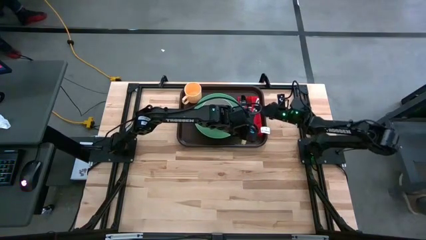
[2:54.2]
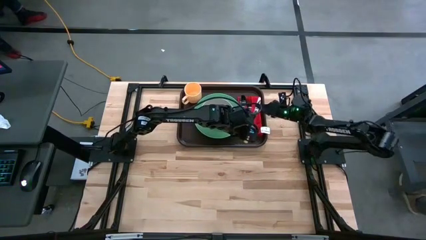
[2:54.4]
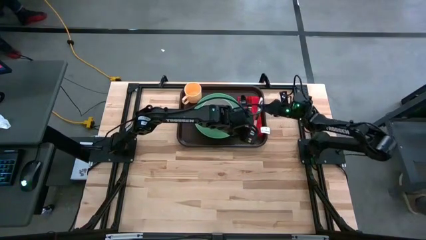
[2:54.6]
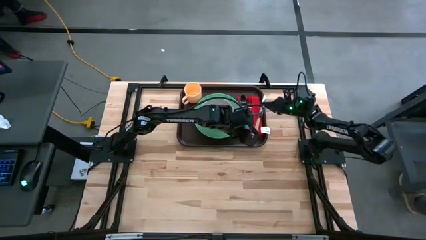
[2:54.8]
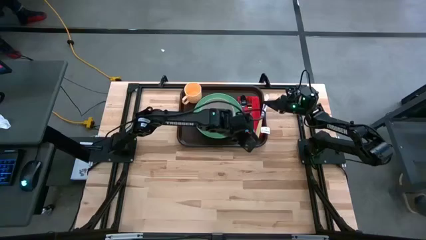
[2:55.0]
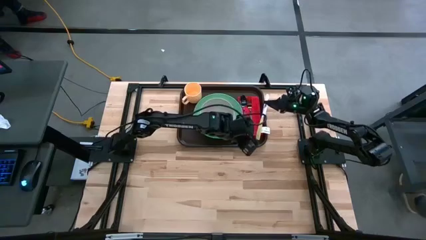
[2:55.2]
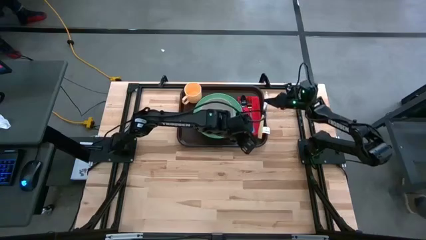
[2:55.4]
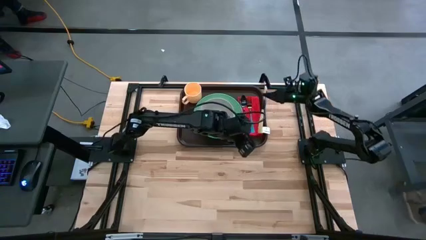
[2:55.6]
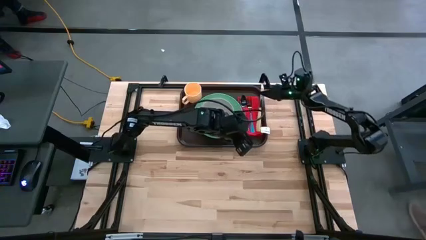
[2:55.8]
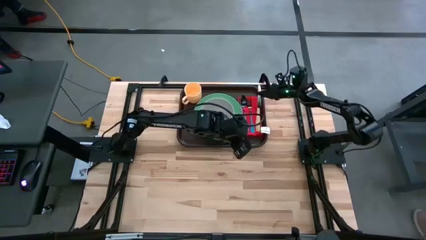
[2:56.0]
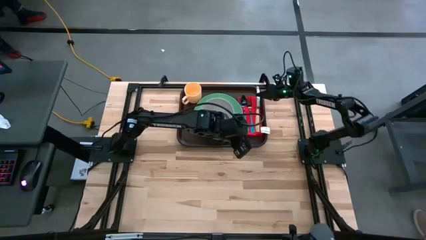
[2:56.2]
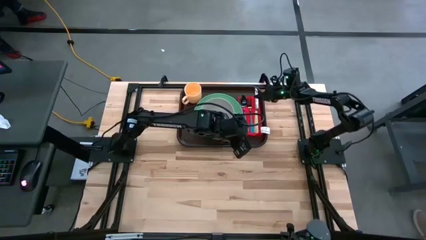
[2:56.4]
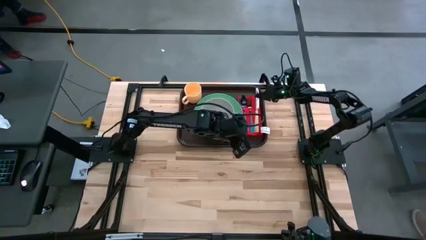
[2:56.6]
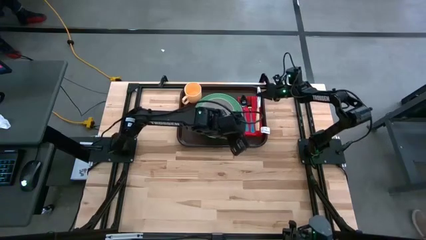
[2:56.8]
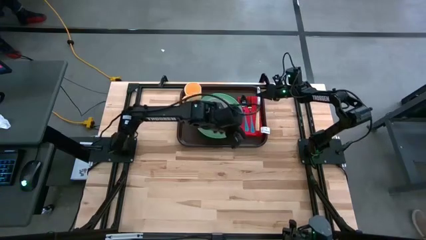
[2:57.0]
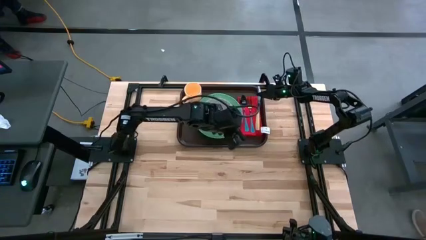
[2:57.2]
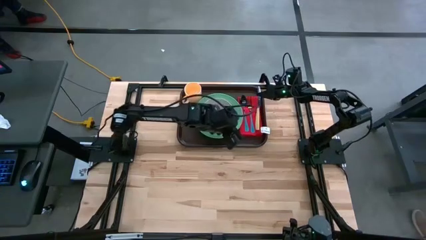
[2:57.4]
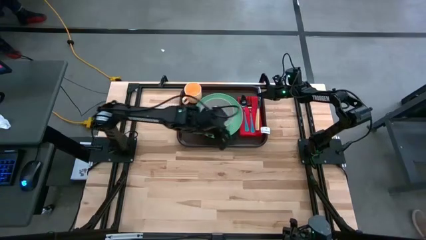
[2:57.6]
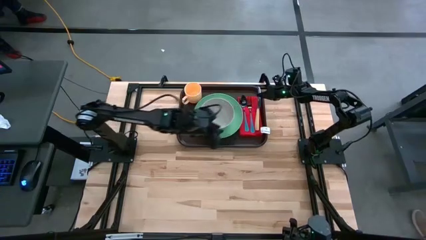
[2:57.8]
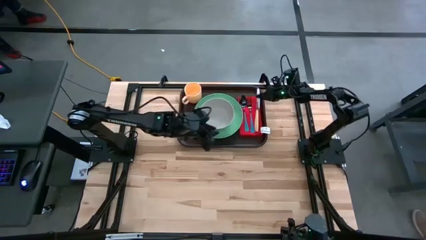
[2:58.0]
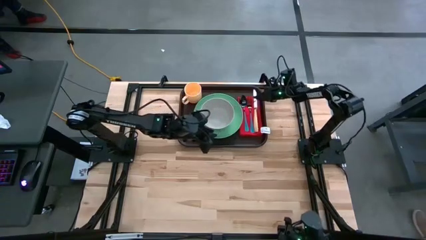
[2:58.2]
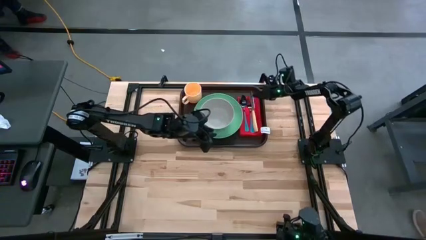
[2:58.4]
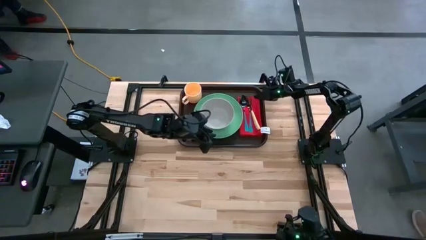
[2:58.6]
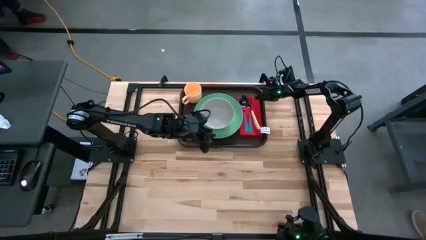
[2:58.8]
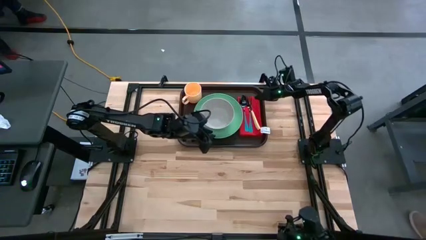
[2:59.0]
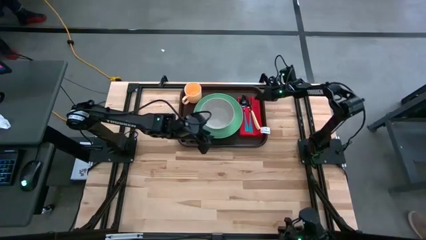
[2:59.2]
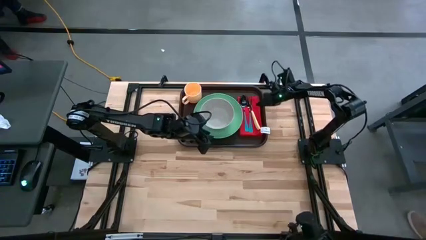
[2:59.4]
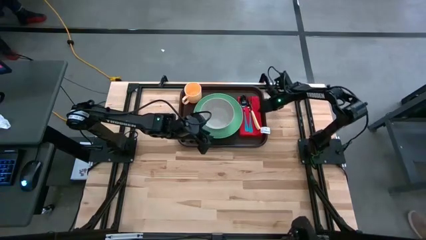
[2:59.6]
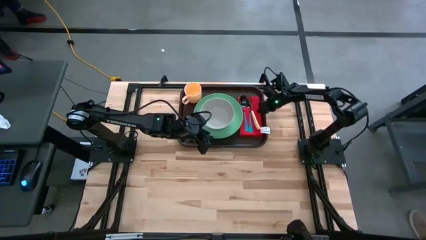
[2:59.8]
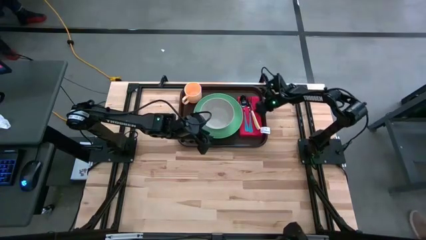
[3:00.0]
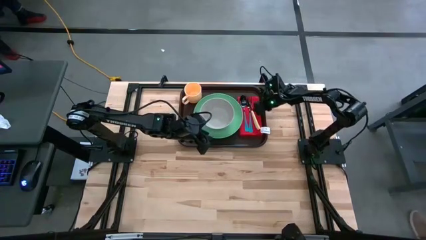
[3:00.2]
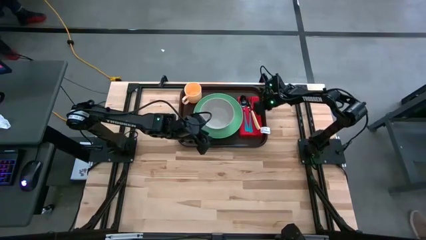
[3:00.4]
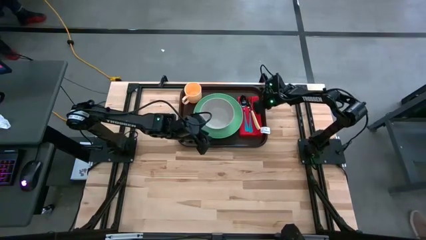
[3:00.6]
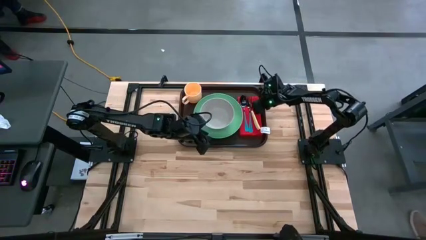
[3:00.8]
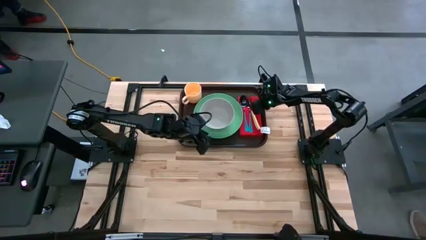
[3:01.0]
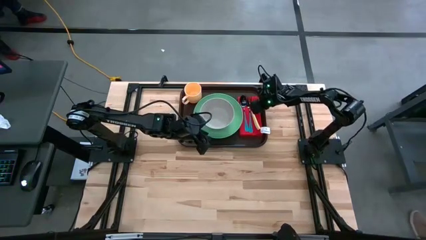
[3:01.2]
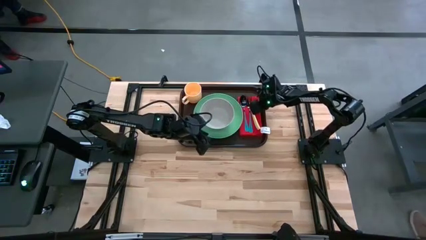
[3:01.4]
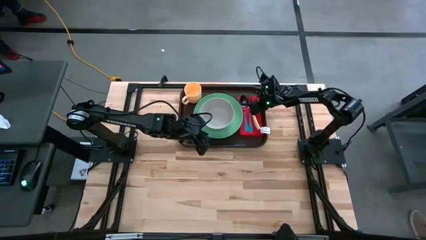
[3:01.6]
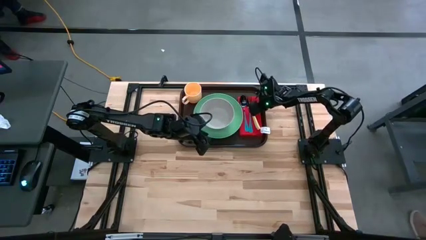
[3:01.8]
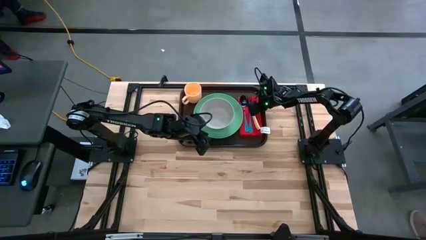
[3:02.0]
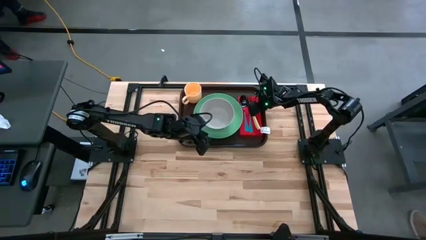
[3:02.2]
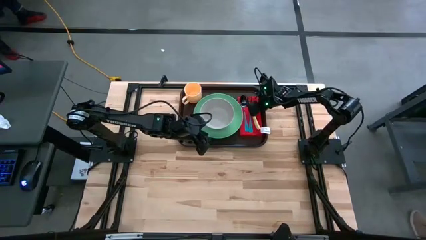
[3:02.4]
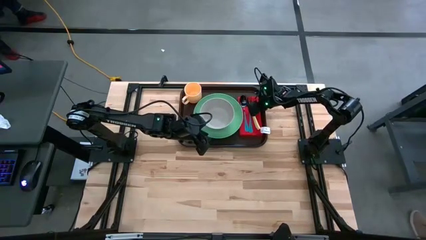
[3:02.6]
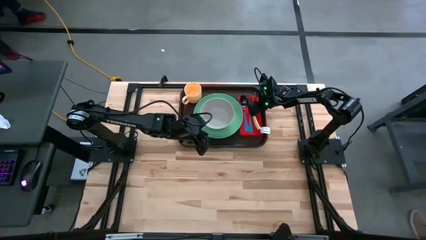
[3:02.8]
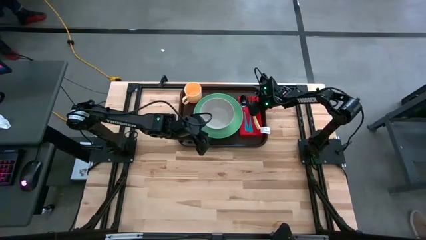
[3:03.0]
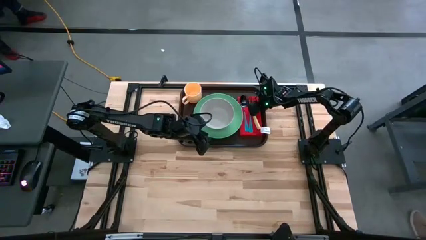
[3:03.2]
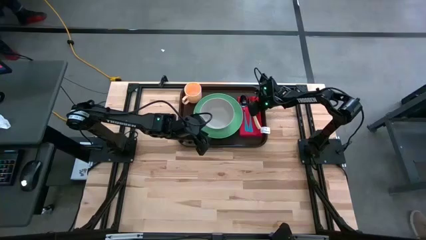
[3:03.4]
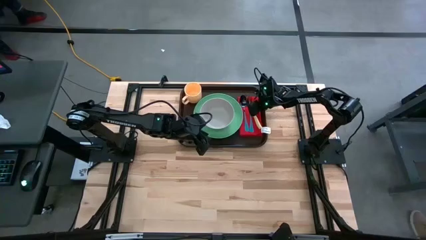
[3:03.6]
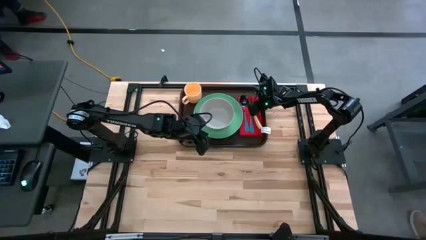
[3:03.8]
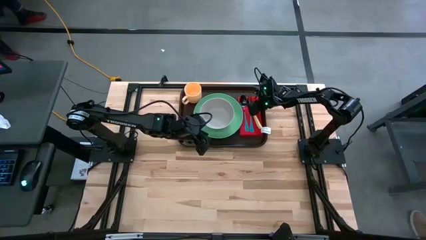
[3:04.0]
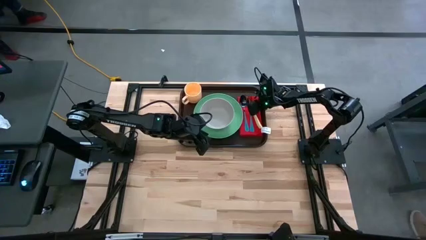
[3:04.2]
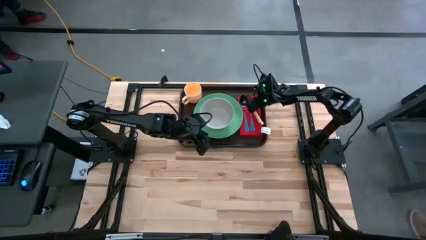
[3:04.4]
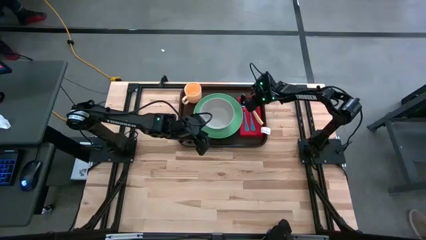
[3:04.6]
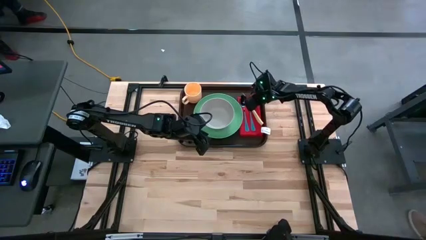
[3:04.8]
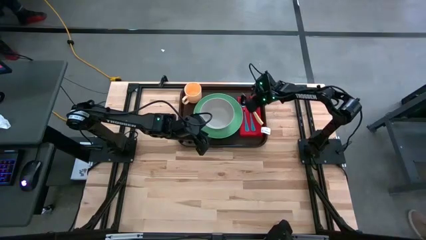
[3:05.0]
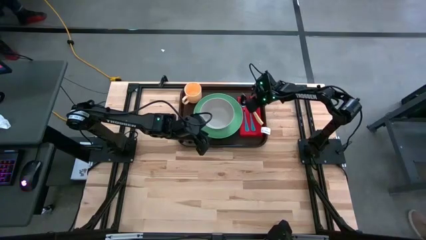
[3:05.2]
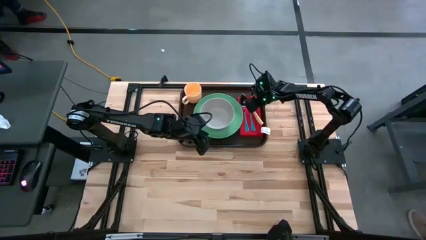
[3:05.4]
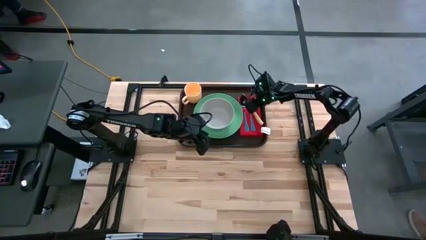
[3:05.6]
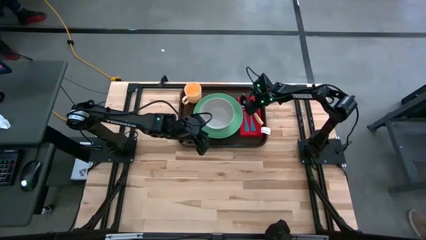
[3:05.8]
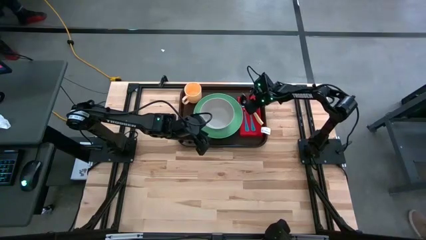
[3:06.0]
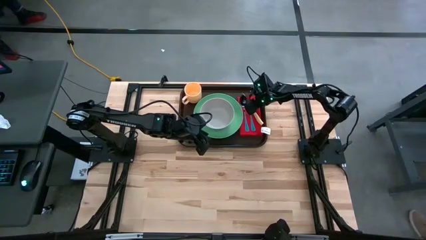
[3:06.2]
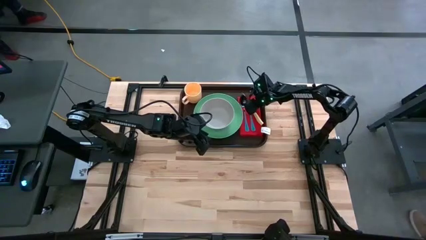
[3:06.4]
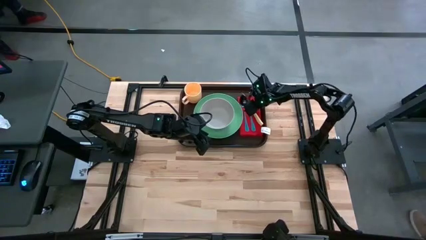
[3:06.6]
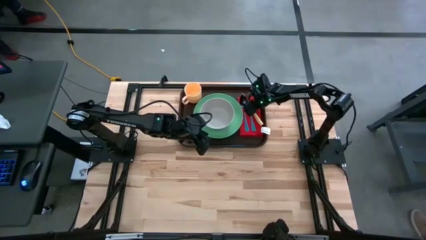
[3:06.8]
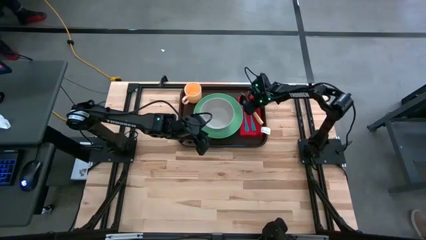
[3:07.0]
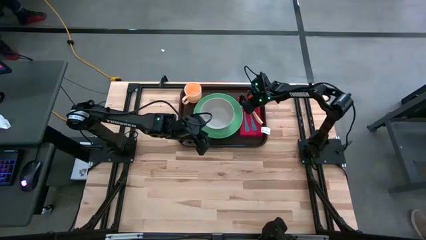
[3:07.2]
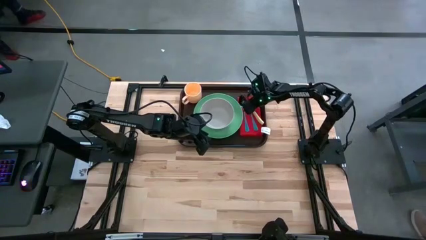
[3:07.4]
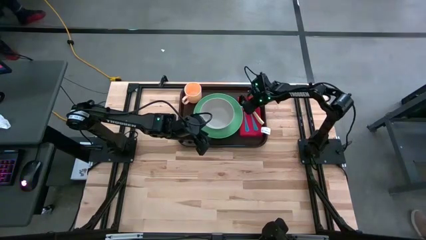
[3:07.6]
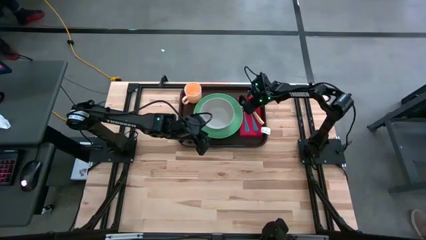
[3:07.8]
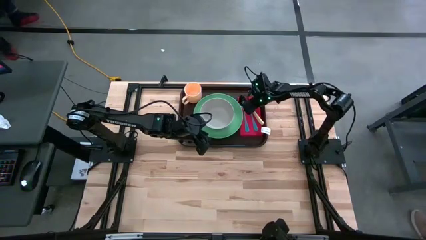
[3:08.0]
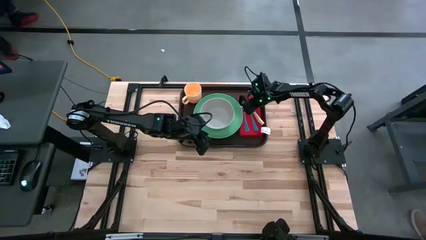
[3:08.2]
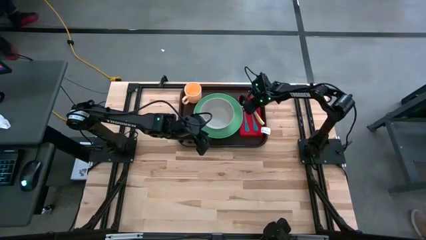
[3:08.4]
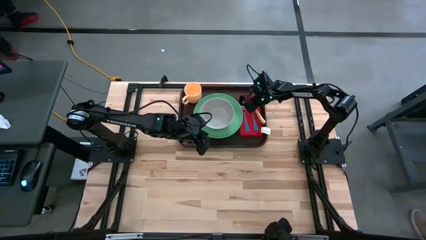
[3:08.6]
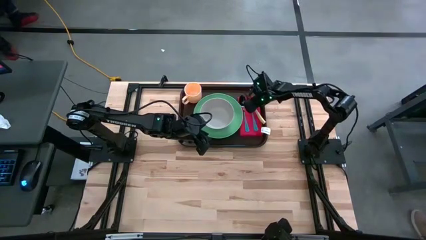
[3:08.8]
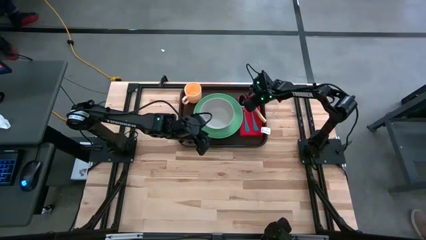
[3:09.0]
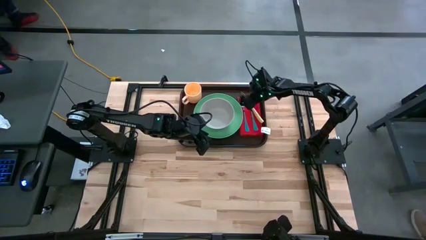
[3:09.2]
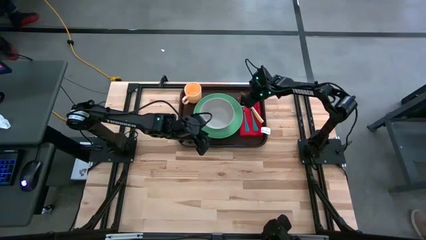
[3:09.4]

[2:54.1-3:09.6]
Task: Set up tray
Put the yellow knife on top of the red napkin to the right of the blue fork
